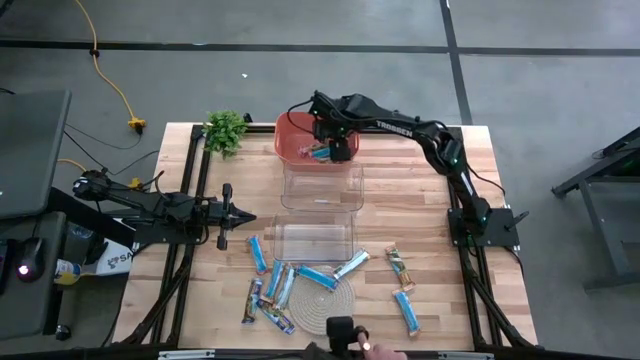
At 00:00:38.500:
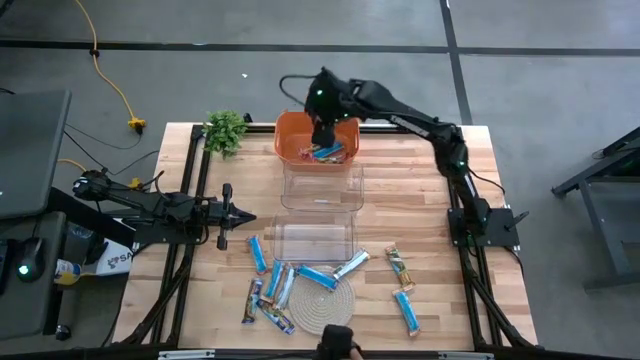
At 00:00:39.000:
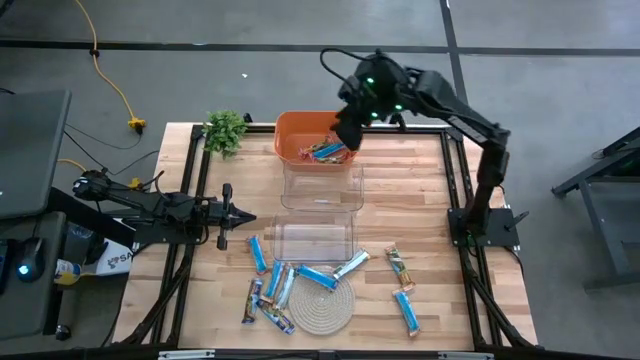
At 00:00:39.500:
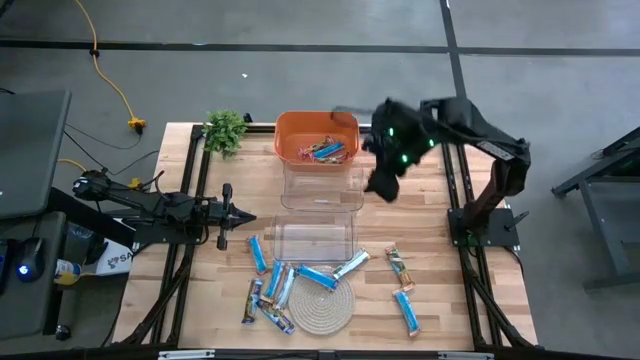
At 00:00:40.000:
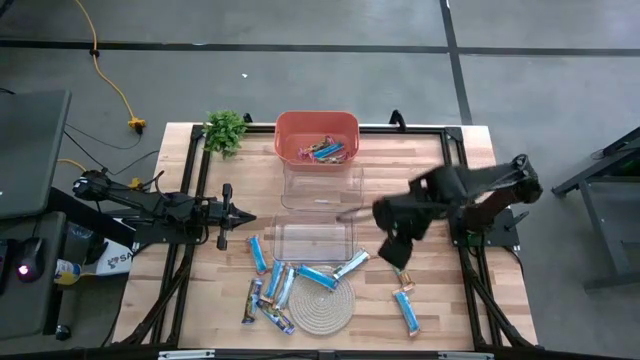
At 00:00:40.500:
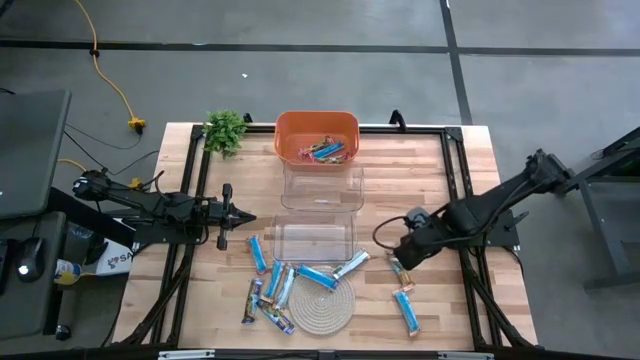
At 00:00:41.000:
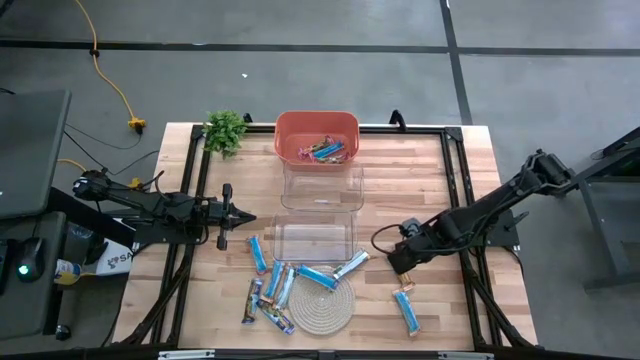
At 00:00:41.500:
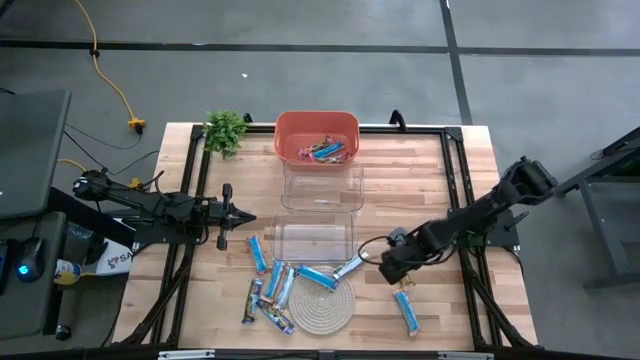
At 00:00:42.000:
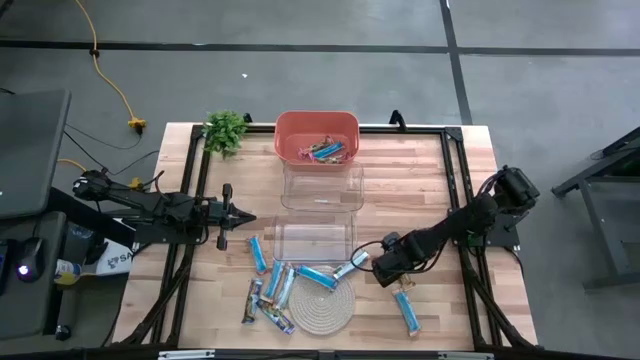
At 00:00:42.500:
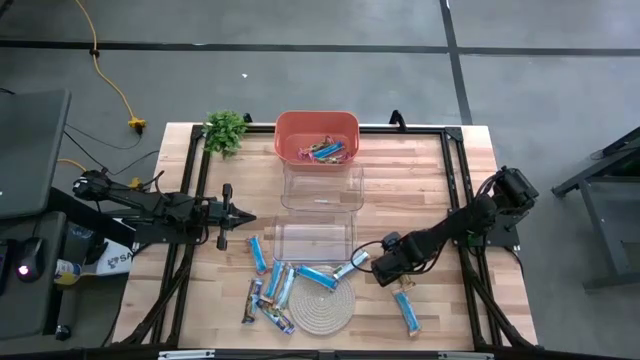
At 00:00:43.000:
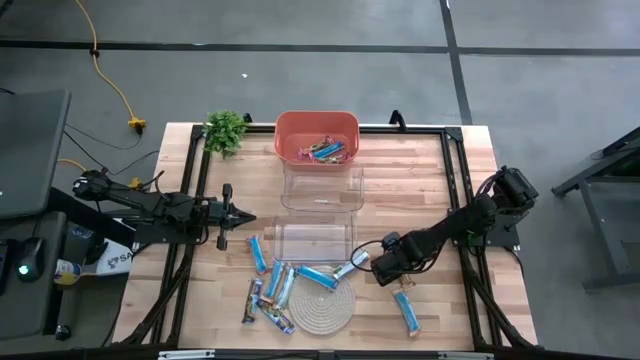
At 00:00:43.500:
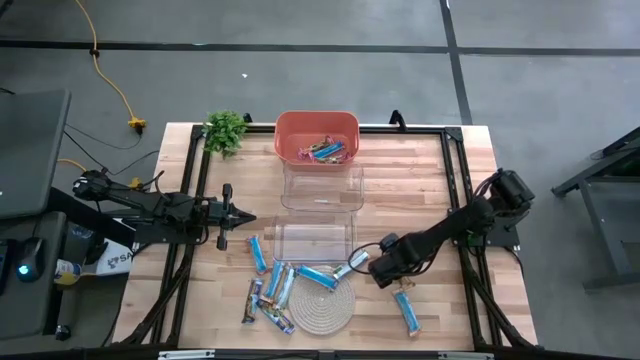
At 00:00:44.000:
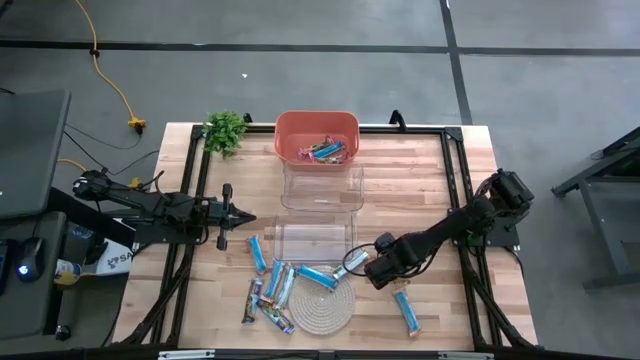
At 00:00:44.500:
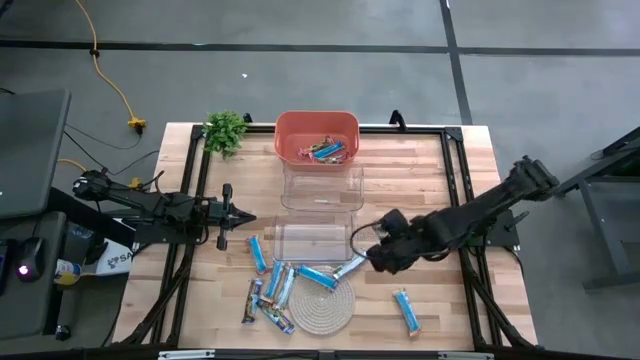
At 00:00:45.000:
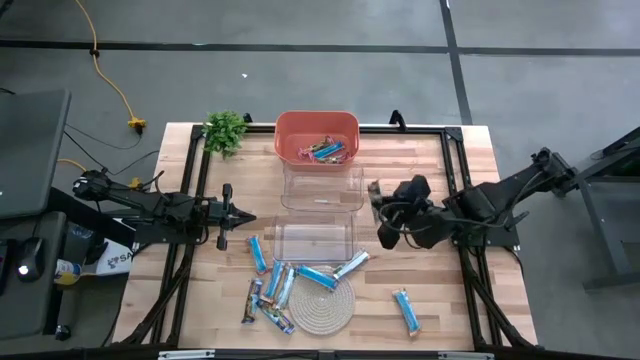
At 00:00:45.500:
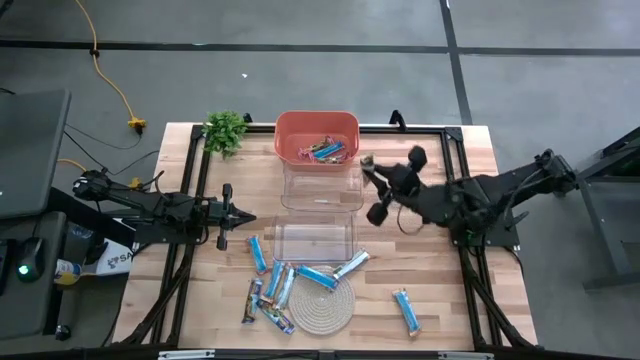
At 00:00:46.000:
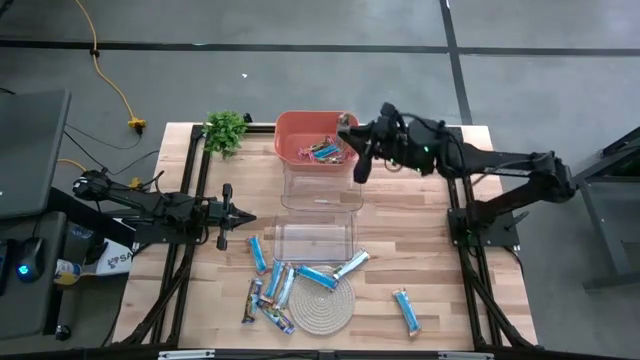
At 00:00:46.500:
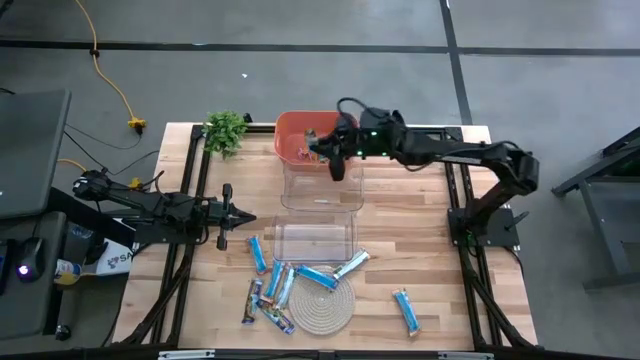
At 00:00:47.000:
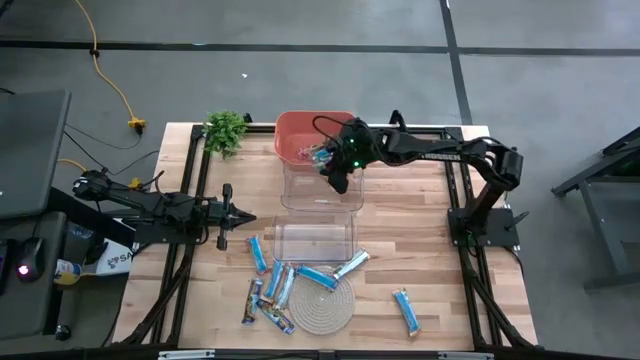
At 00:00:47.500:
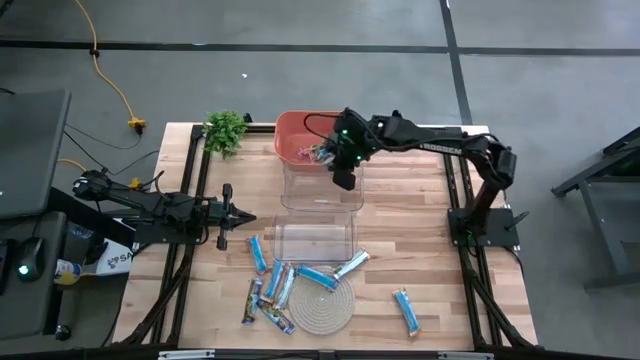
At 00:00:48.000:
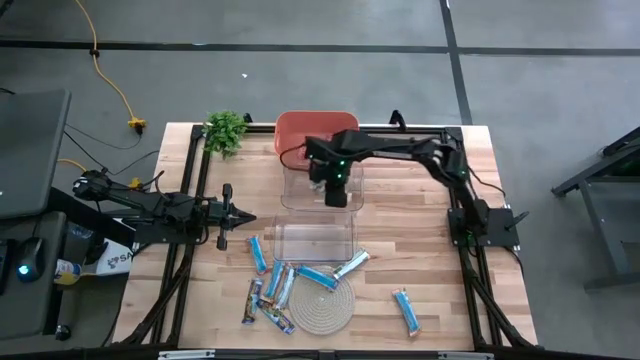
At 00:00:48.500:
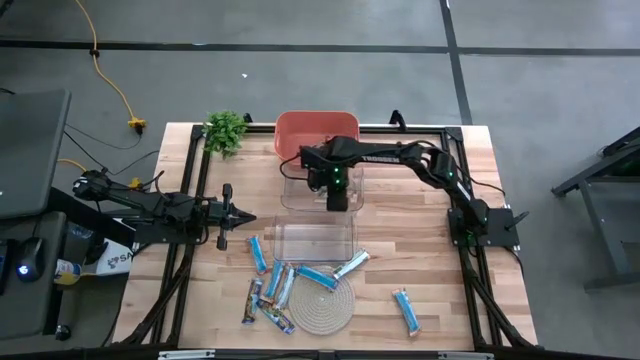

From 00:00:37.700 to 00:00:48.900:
Task: Pick and place Granola Bars by type
Put the yellow granola bar into the top transparent bin

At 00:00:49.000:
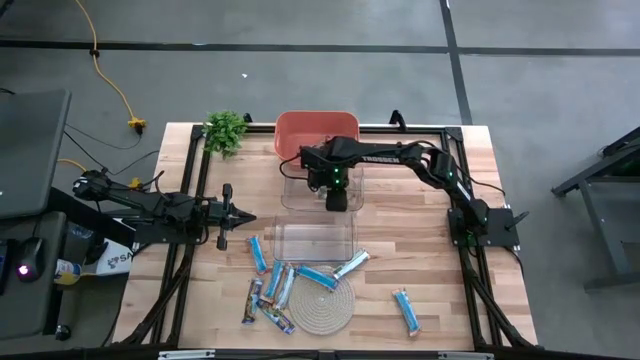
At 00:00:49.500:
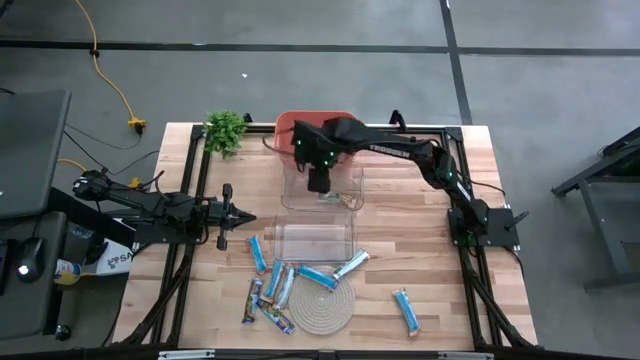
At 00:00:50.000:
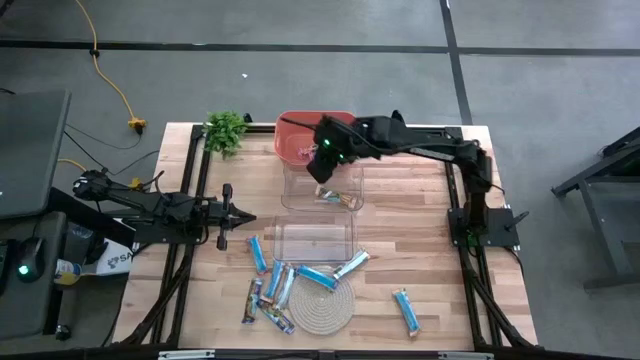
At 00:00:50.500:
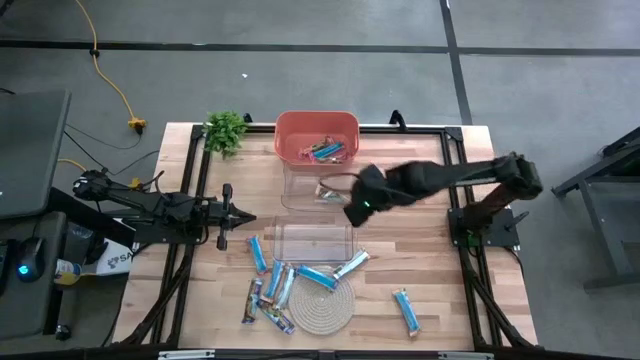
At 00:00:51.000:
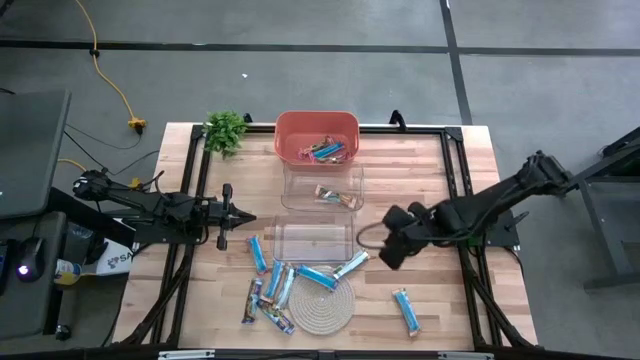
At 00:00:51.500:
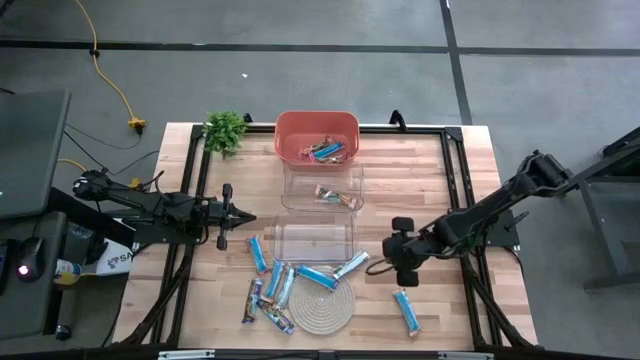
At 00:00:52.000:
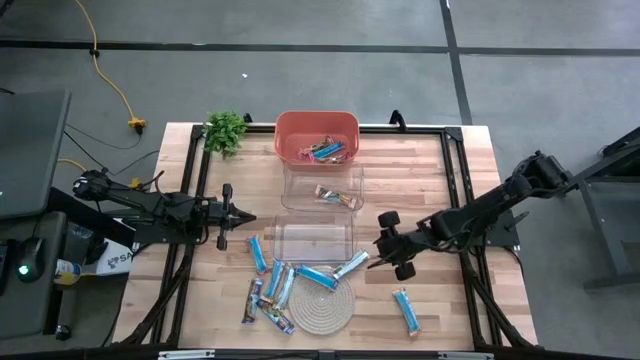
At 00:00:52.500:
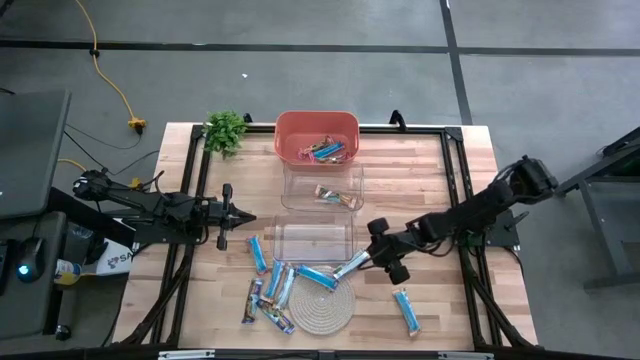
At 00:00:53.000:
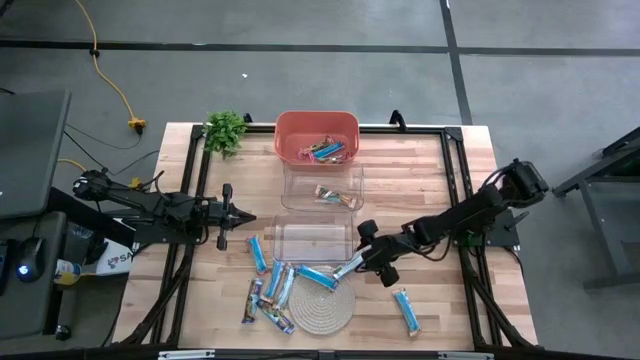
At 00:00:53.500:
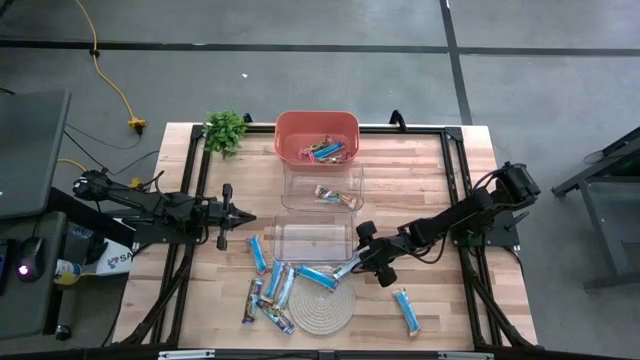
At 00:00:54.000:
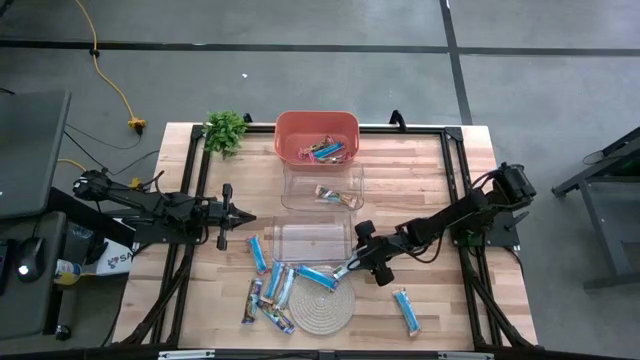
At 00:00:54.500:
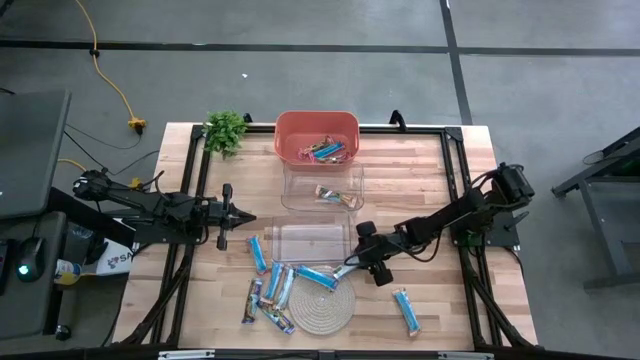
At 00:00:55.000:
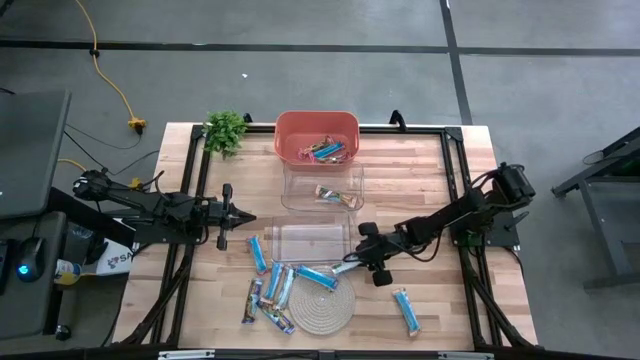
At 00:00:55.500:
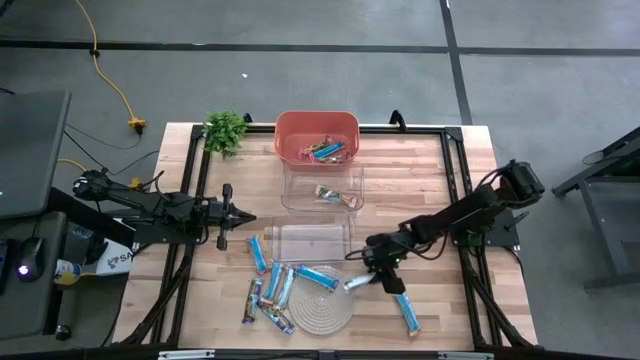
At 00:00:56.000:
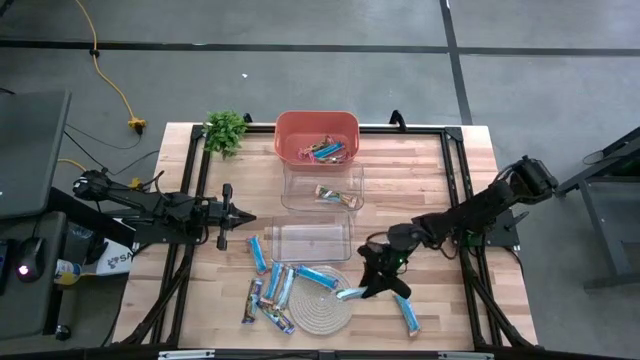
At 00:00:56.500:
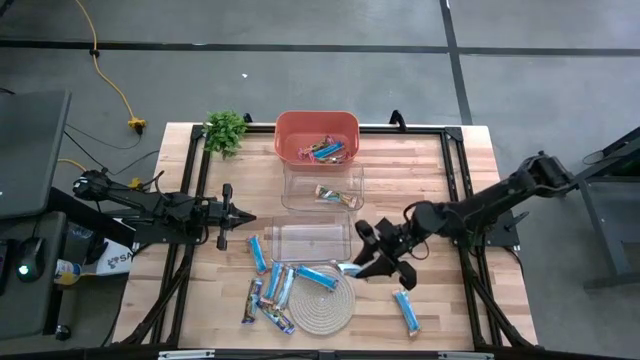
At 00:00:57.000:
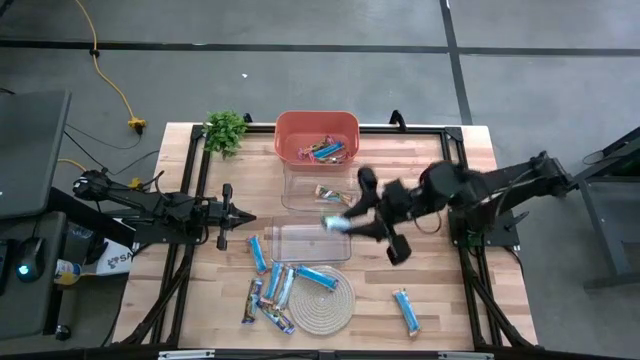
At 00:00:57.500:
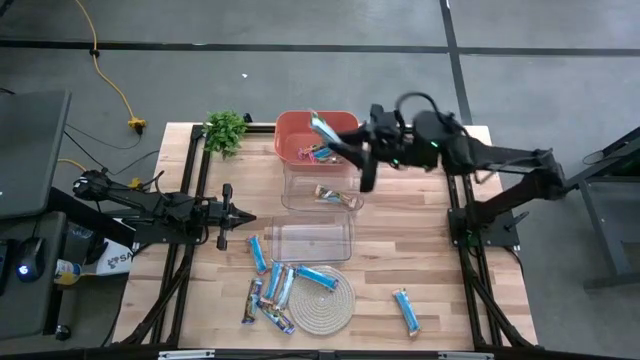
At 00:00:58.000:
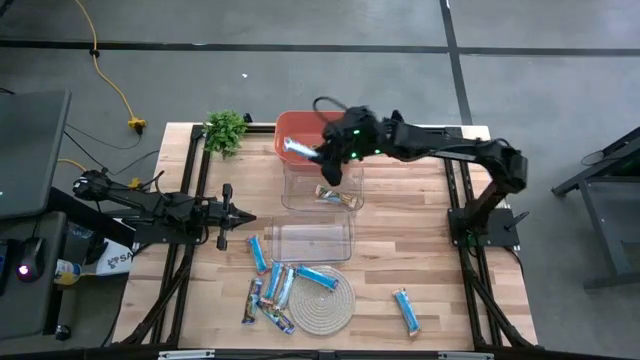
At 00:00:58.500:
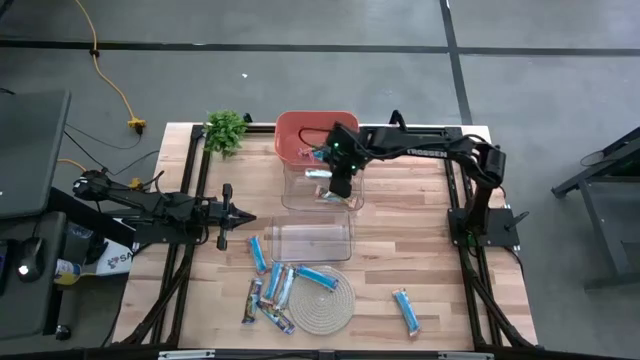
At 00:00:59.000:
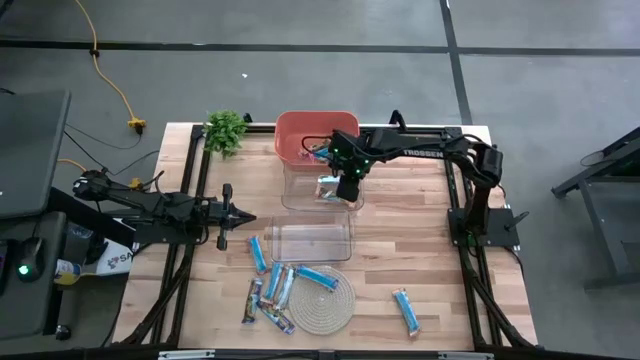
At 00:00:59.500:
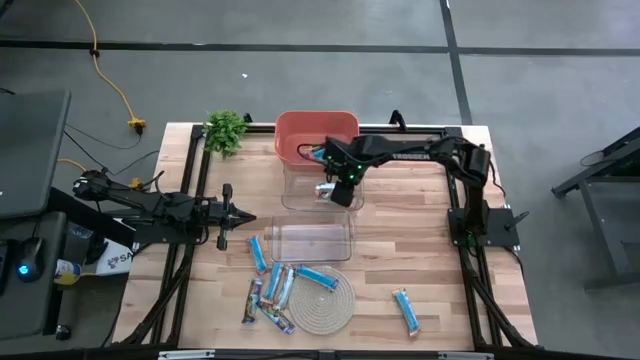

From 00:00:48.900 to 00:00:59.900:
Put the yellow granola bar into the top transparent bin
